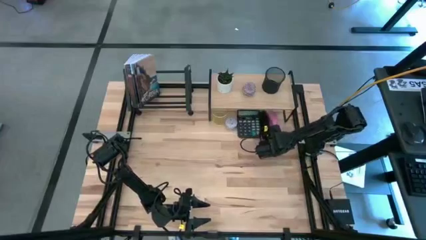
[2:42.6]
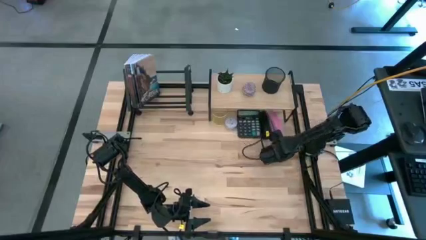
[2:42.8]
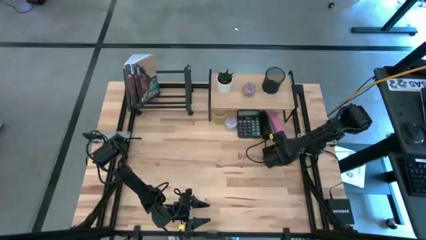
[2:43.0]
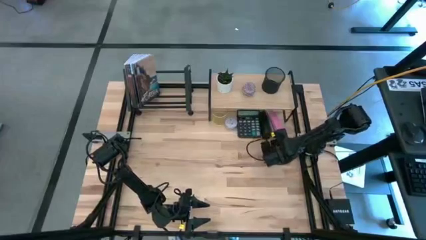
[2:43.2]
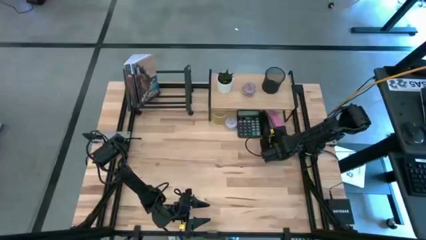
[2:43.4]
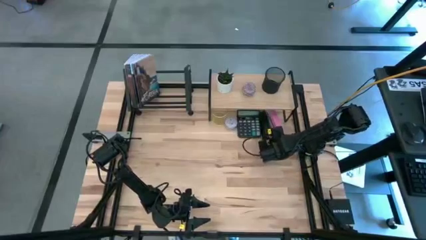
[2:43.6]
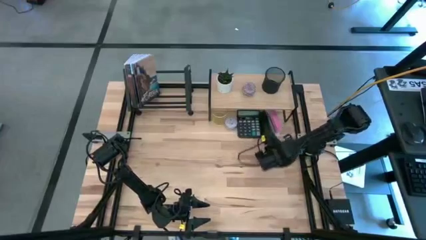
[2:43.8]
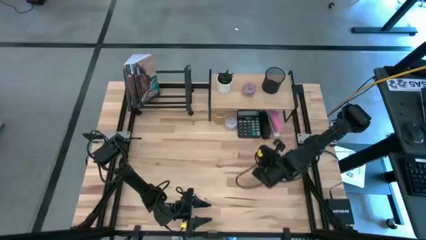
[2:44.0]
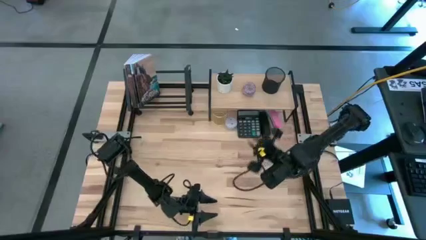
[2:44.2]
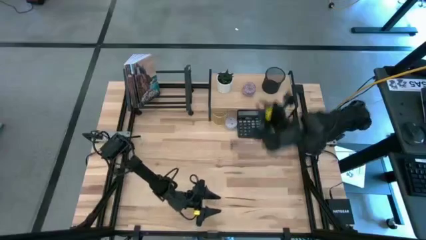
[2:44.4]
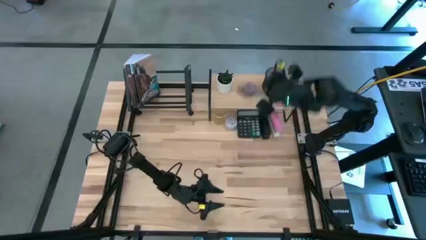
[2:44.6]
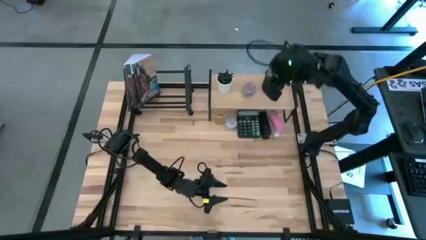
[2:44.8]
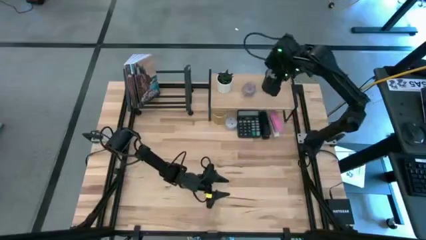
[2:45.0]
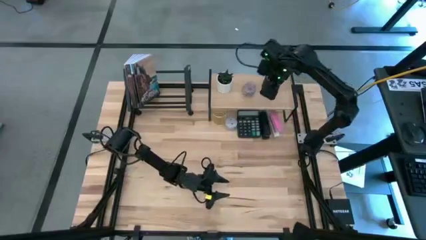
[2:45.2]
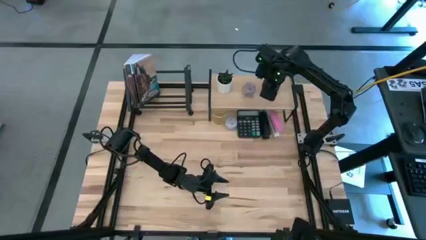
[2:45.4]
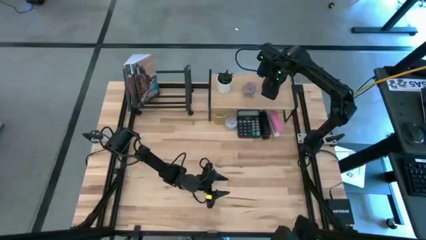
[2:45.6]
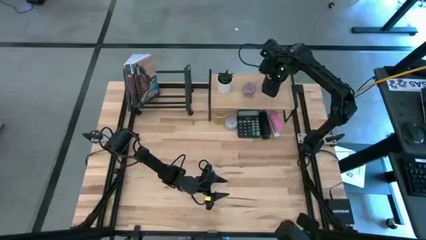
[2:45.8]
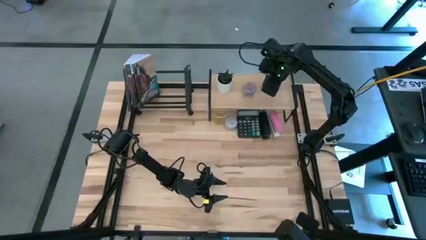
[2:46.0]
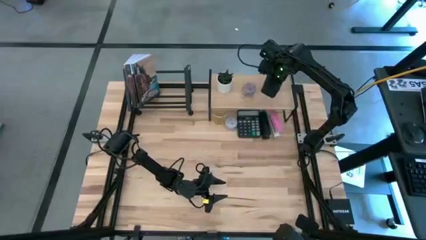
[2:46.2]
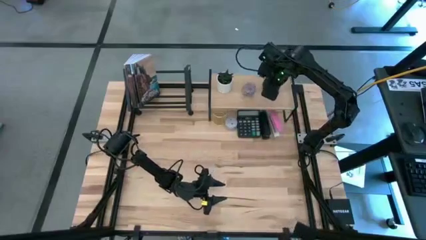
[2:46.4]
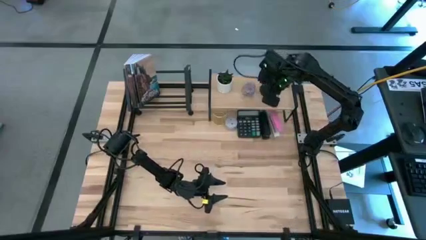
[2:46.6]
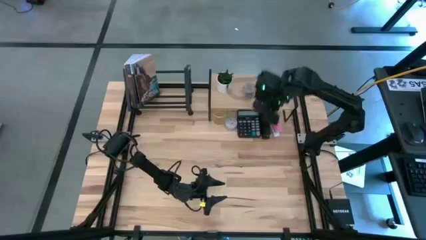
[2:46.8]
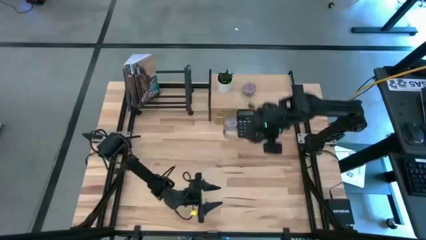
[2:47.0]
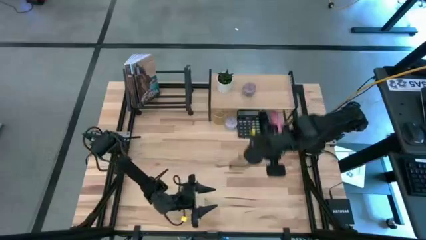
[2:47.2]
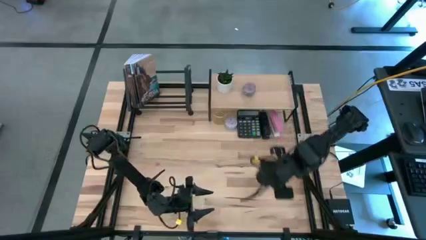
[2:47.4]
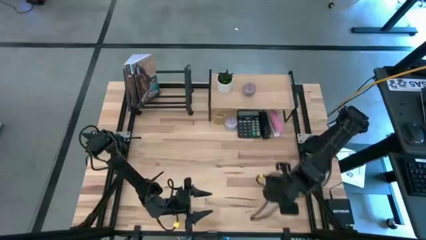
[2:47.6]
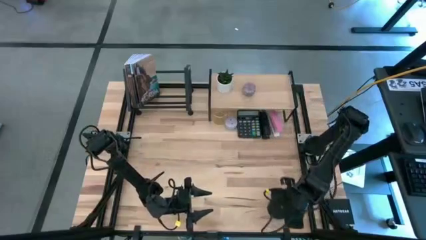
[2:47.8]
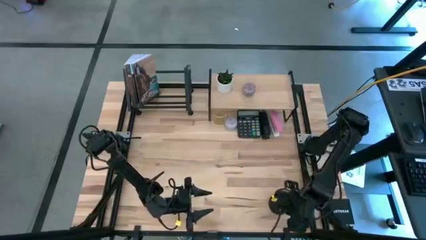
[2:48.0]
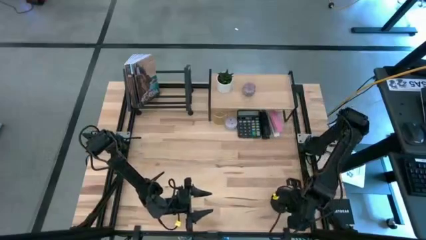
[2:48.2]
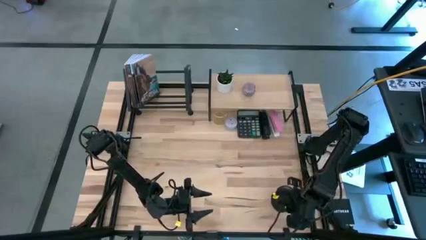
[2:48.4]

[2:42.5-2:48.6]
Task: Stock shelves
Remove the black pen holder from the shelf

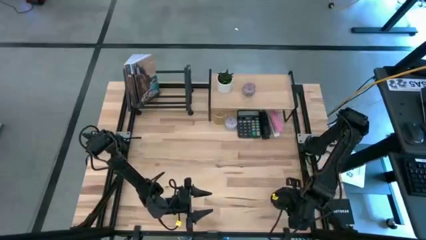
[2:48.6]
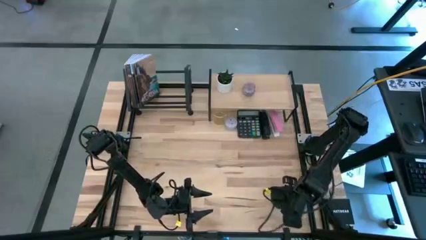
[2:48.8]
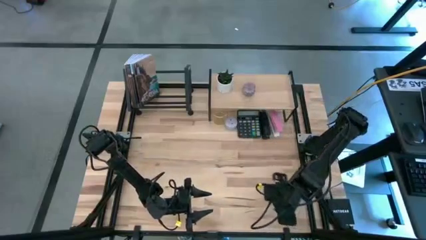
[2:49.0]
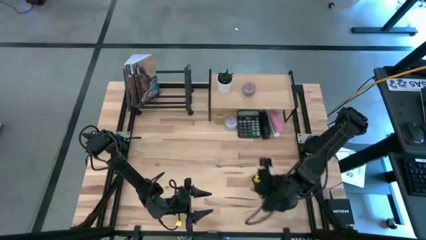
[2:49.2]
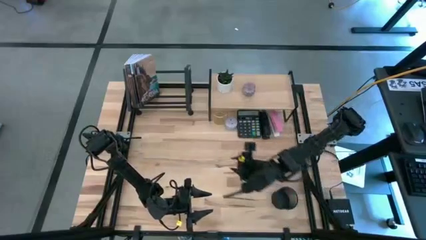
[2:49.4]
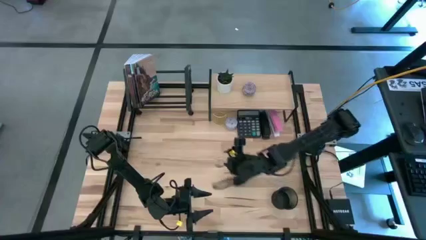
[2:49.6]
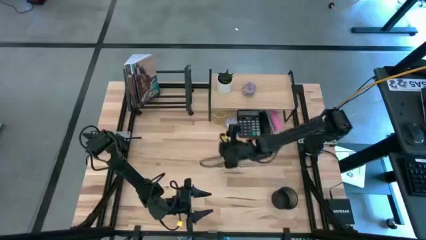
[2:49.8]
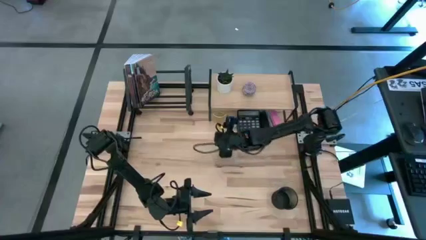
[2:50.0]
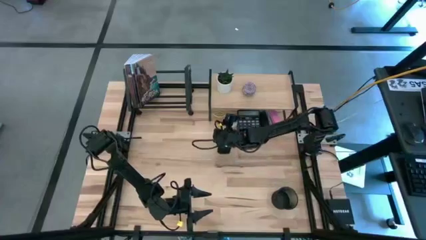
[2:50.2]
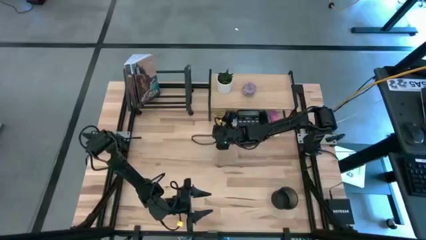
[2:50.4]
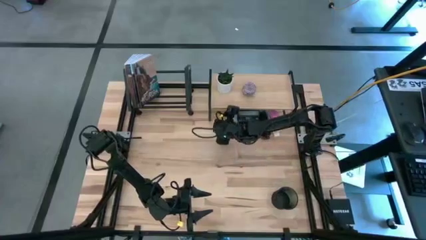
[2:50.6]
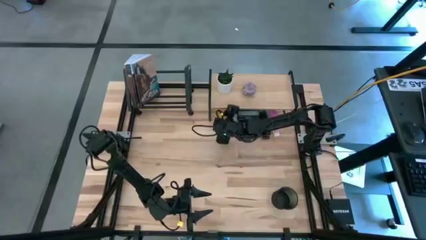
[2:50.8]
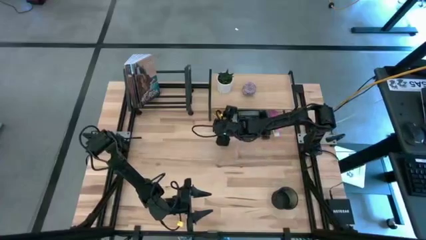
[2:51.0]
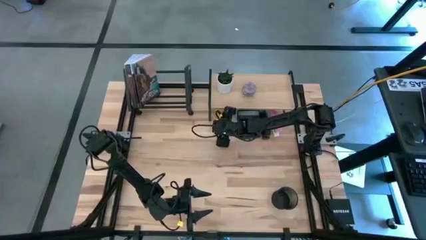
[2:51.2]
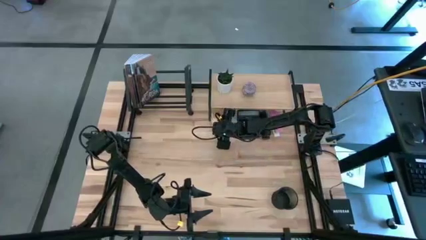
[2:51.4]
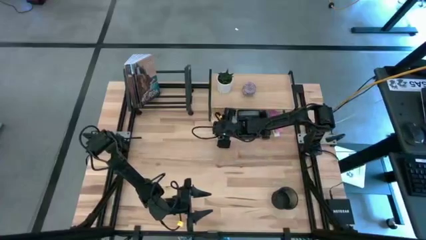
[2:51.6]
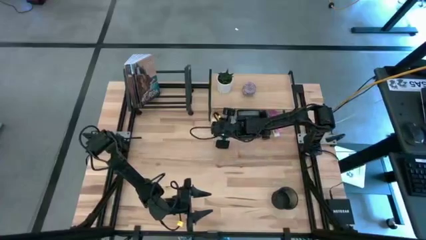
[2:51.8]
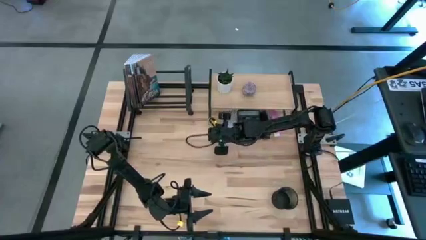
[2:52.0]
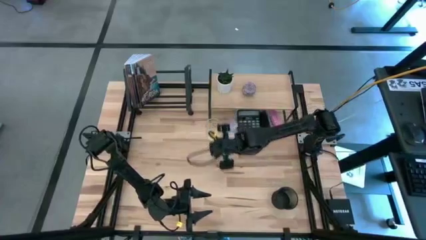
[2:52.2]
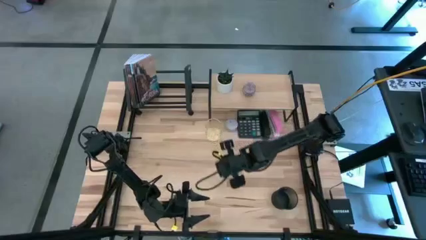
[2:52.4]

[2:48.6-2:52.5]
Remove the gold pen holder from under the shelf

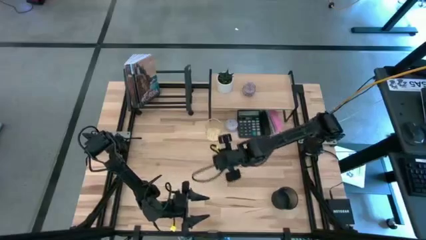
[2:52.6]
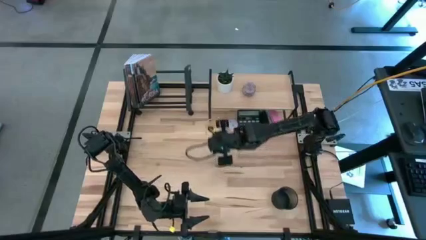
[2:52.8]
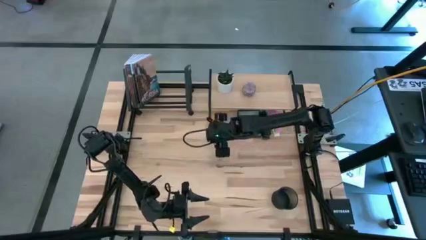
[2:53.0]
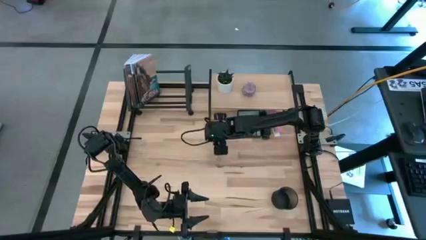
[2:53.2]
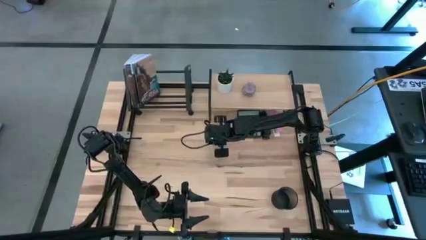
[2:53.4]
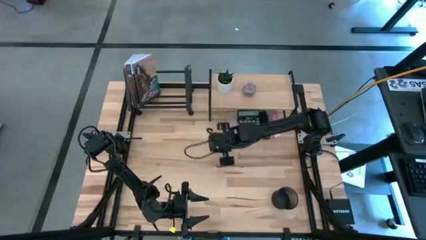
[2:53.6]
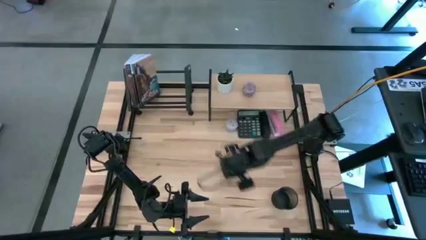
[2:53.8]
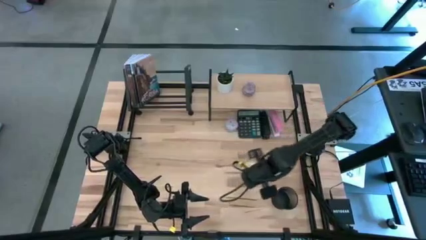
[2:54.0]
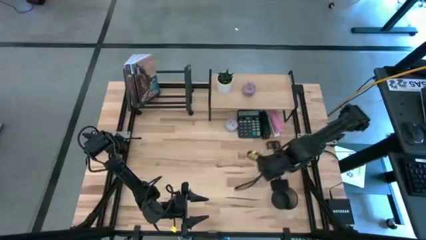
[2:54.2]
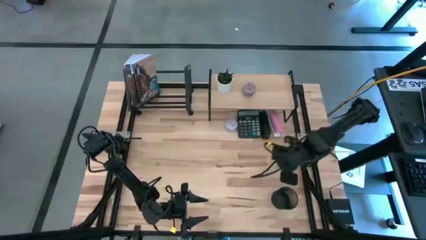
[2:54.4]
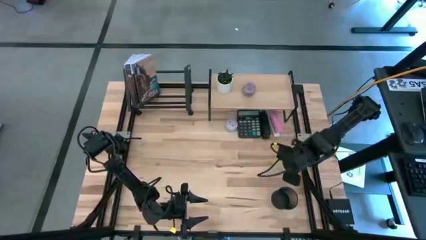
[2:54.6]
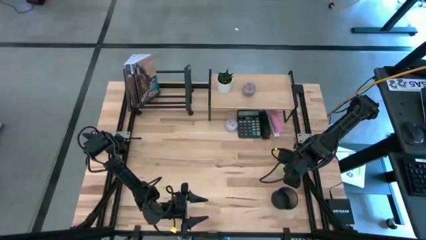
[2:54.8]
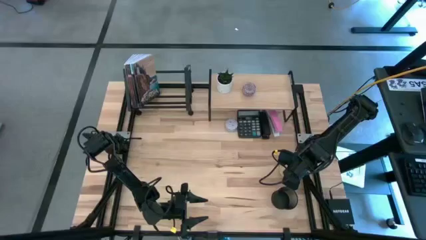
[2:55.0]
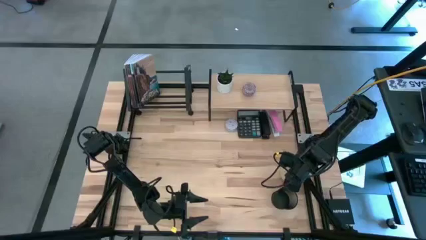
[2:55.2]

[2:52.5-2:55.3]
Remove the gold pen holder from under the shelf

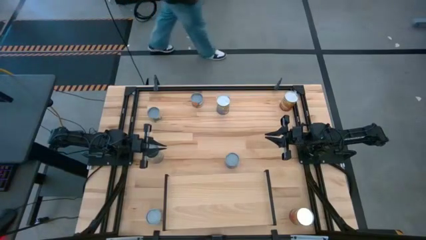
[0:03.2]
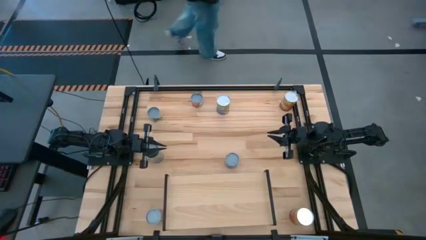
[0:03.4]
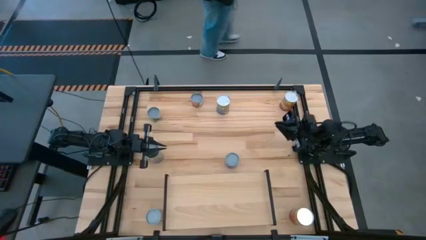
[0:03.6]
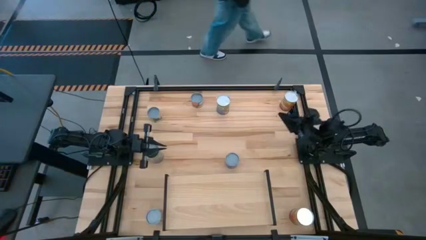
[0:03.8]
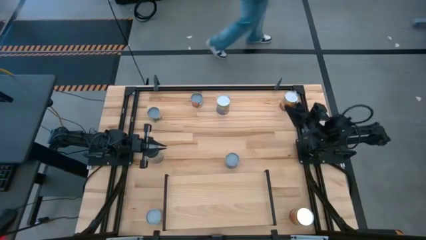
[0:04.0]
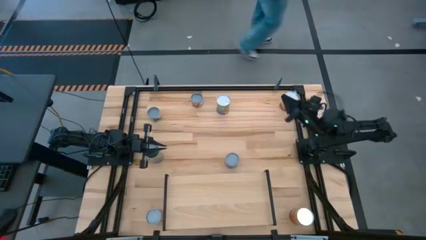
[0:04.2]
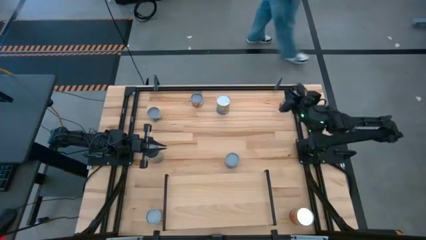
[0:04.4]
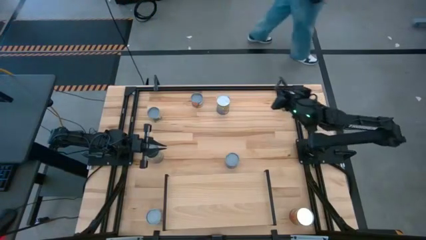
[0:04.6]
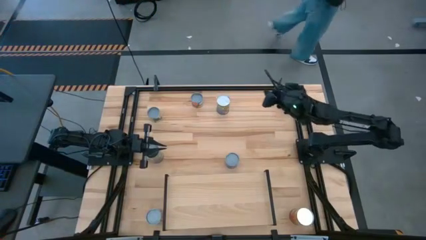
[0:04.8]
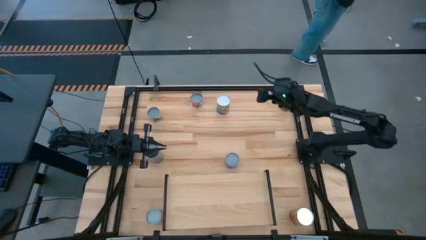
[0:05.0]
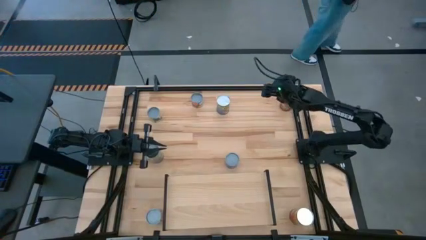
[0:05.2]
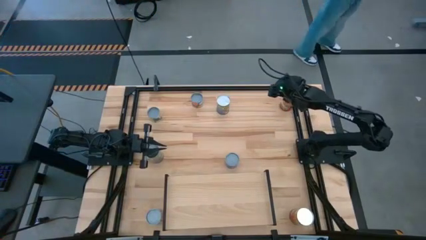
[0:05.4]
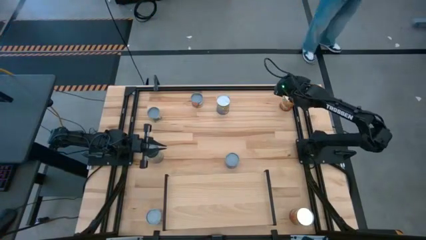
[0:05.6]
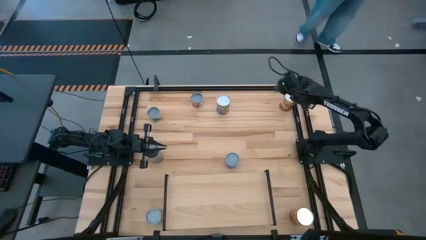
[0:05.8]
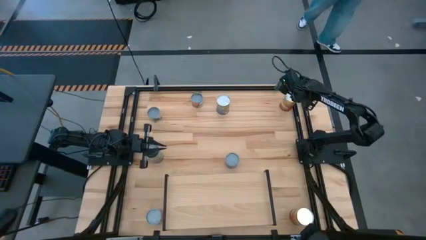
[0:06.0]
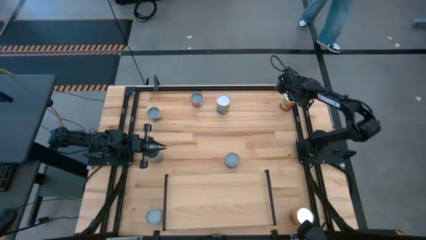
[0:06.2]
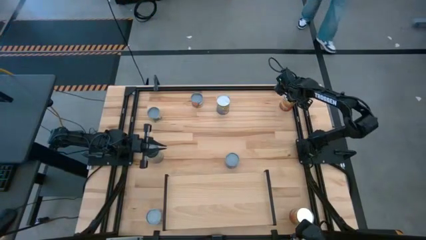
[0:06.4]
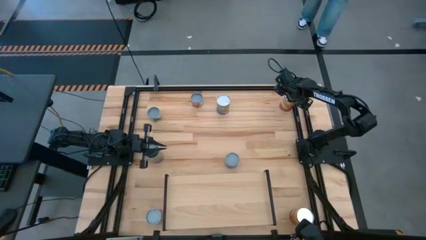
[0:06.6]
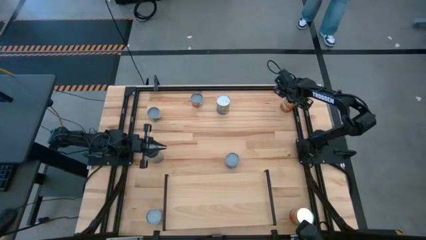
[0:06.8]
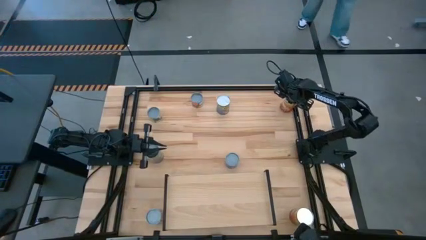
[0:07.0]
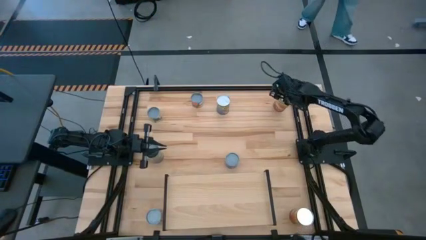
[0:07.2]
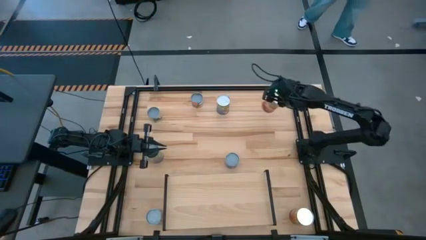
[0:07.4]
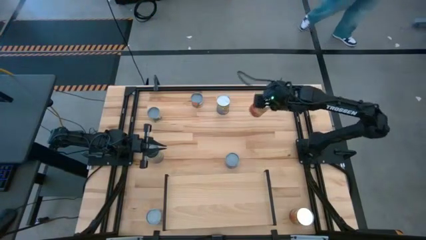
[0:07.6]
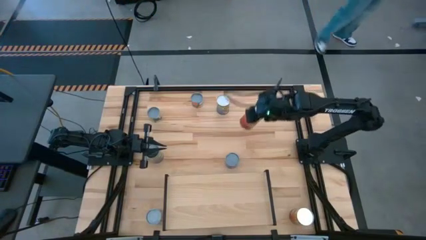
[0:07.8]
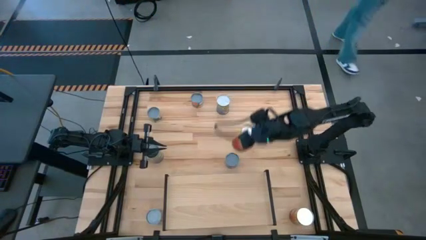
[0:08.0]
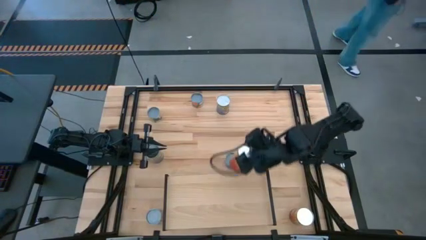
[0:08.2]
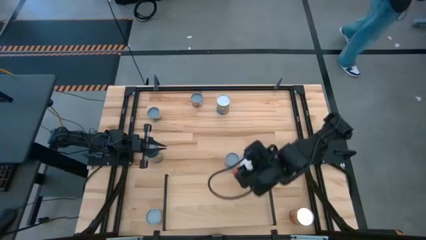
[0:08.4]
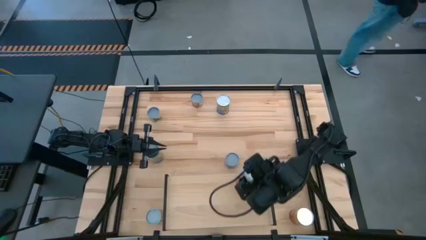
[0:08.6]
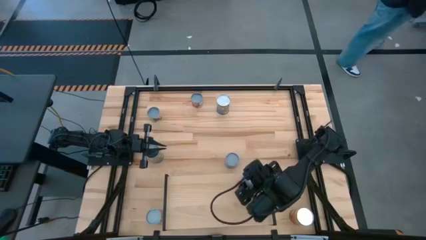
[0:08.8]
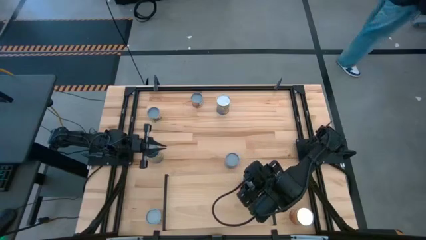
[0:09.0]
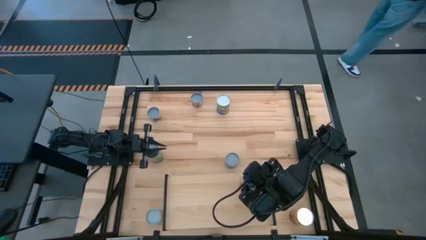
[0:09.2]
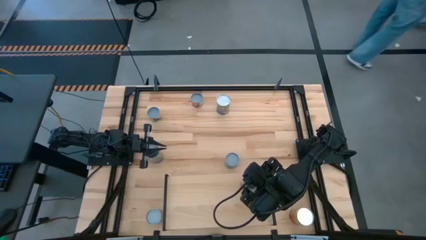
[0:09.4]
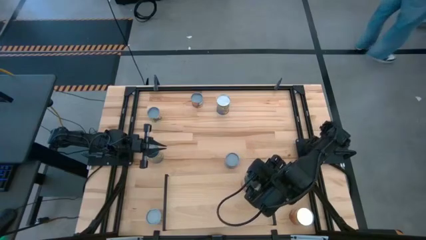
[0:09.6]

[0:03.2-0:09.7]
Task: Pick and place cans onto a shelf
Put the top large canned corn on the shelf
